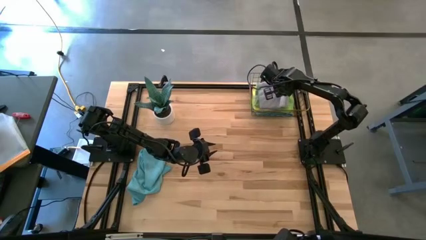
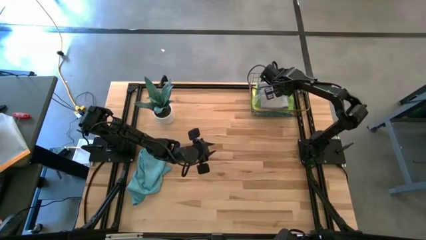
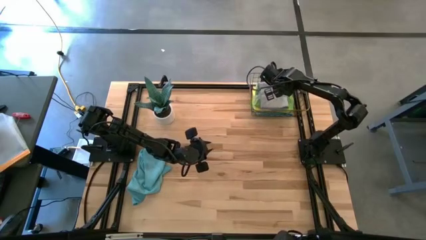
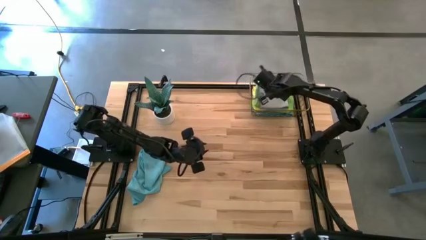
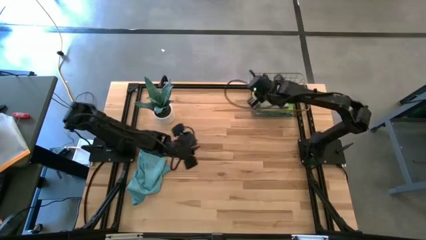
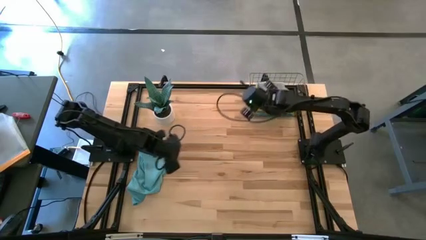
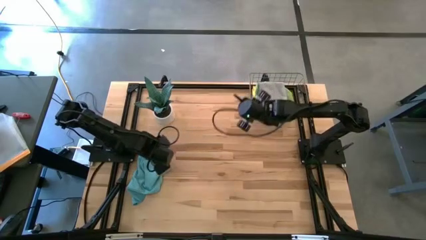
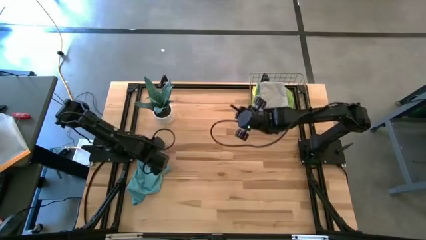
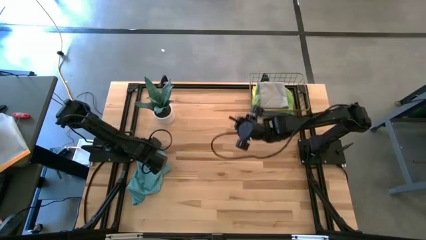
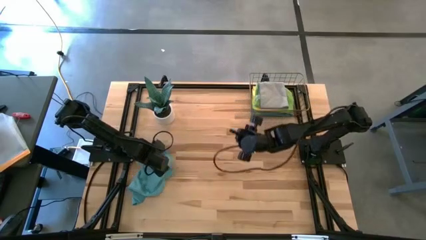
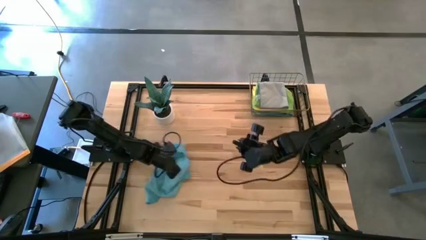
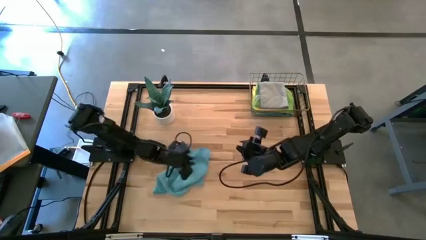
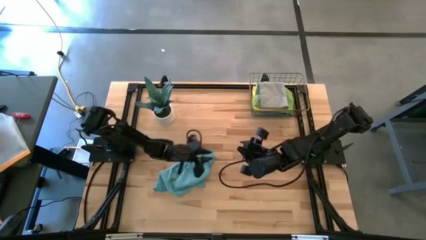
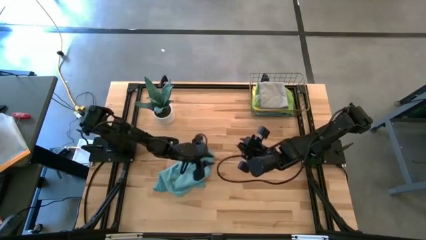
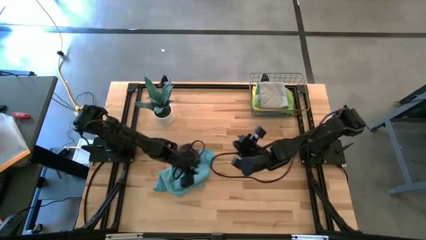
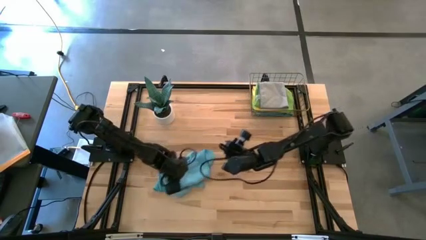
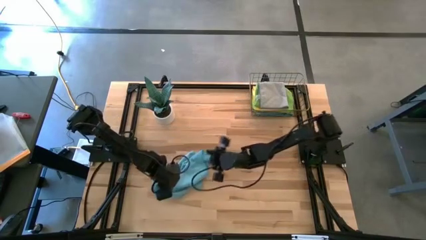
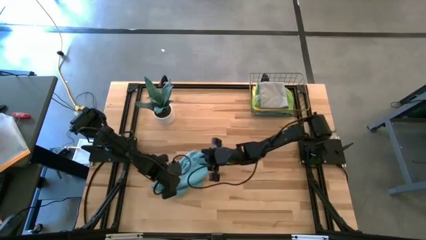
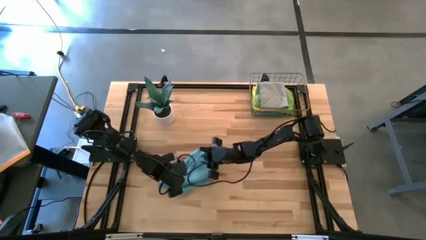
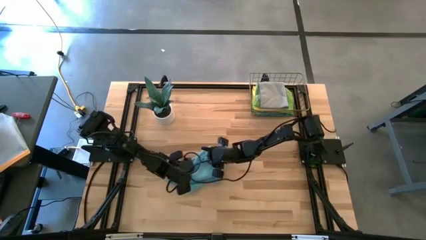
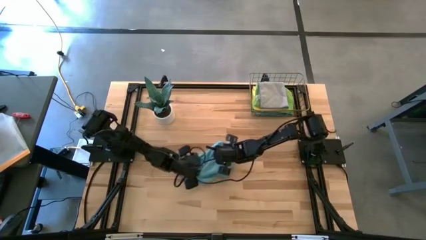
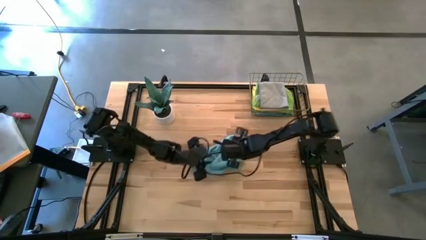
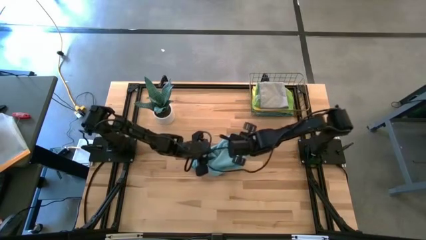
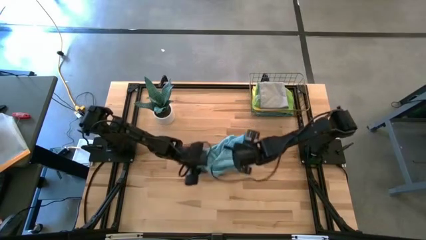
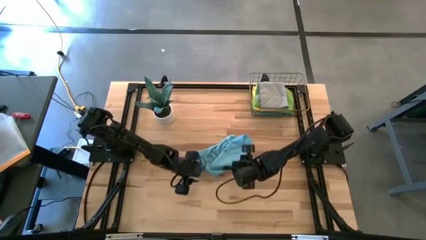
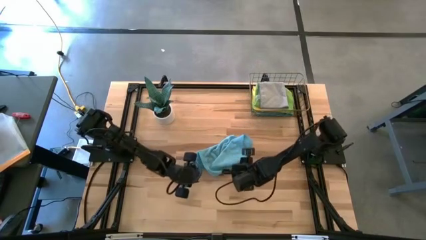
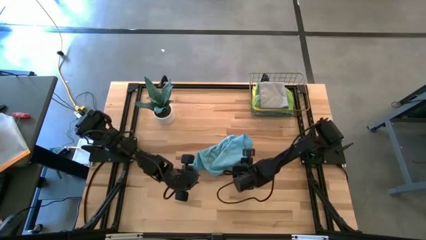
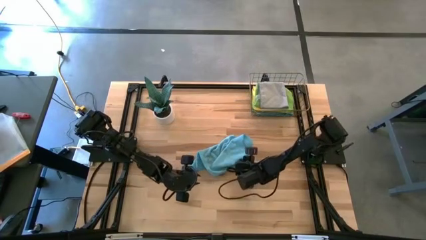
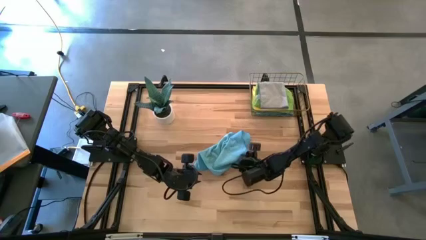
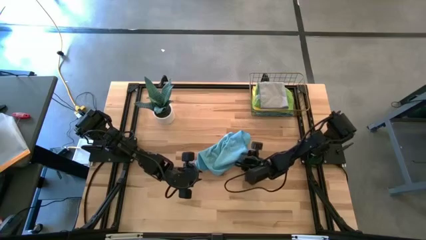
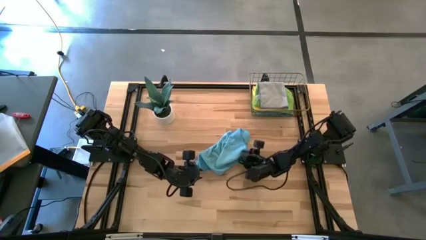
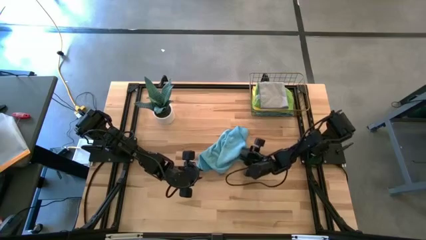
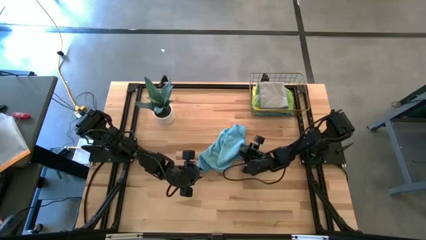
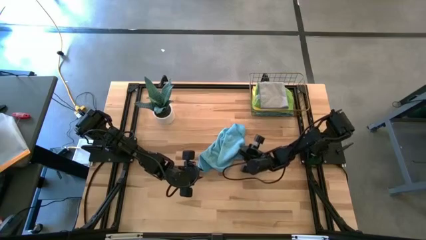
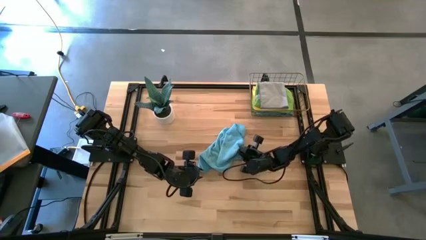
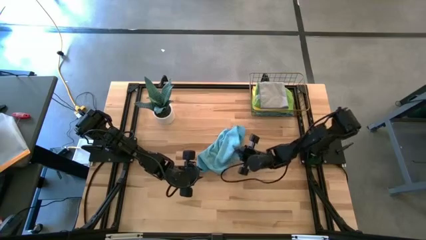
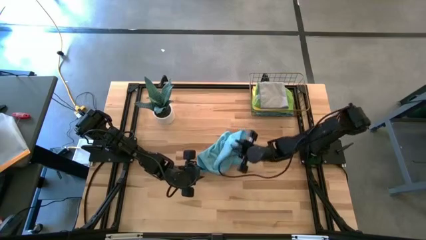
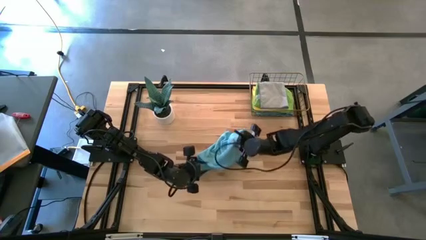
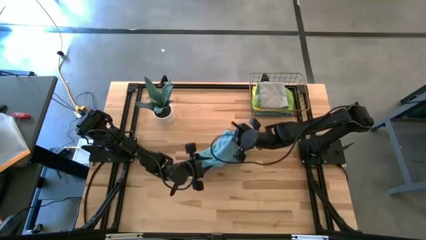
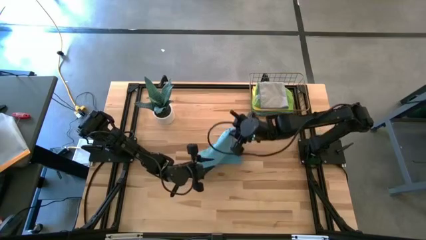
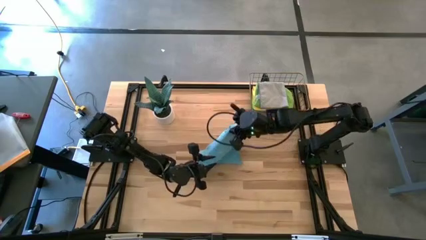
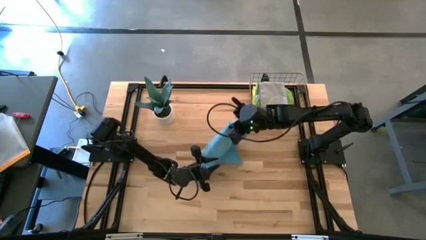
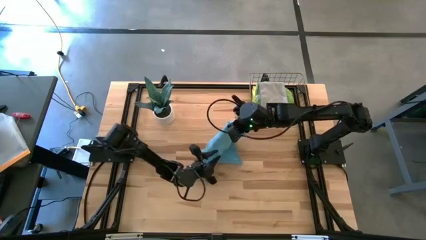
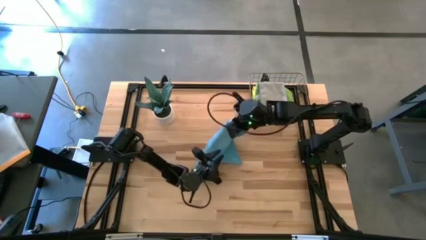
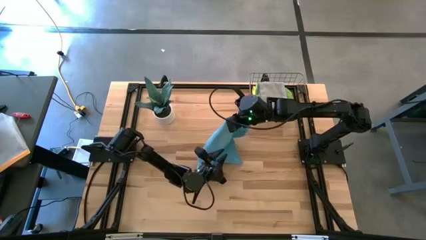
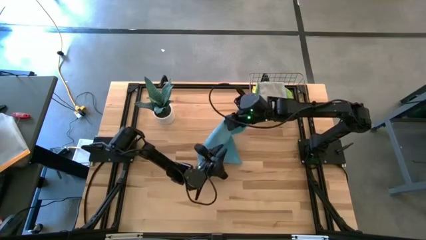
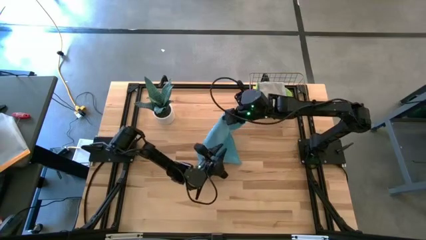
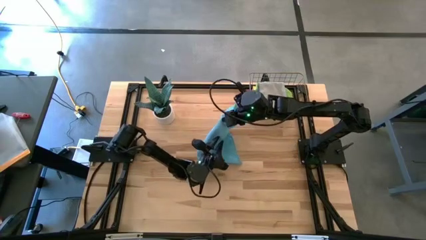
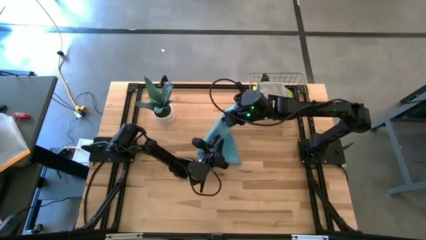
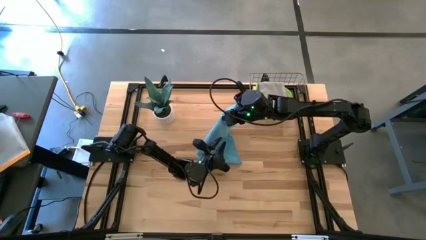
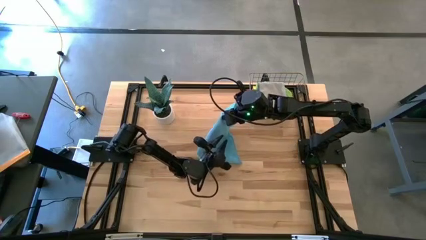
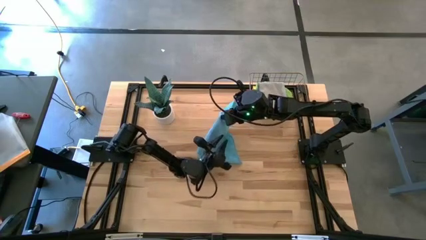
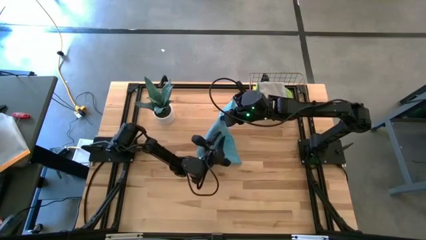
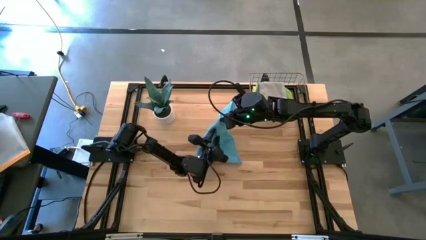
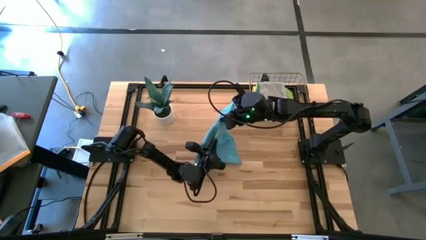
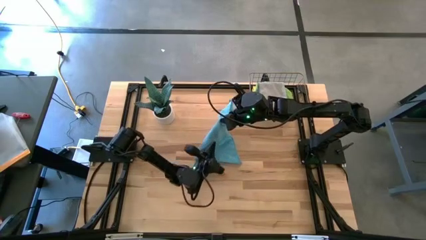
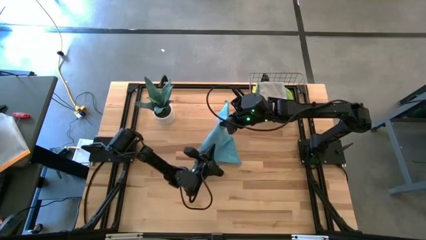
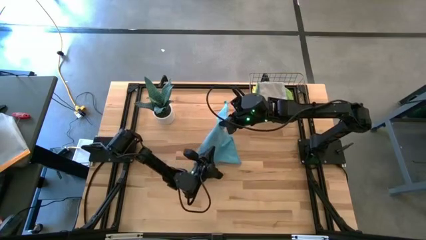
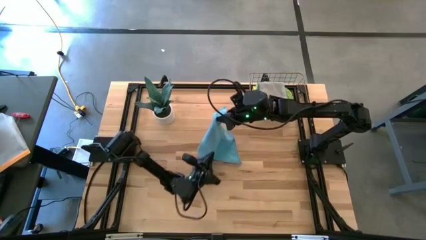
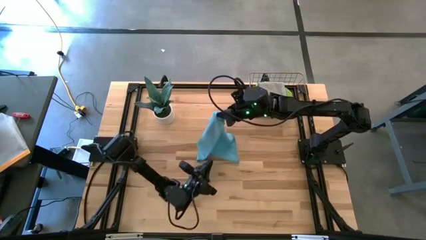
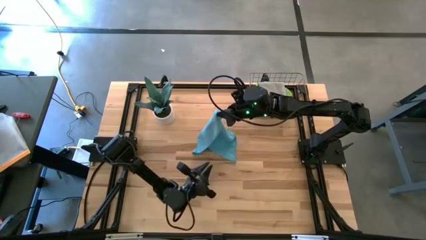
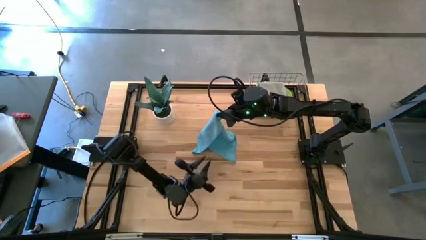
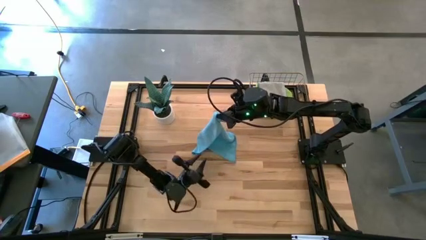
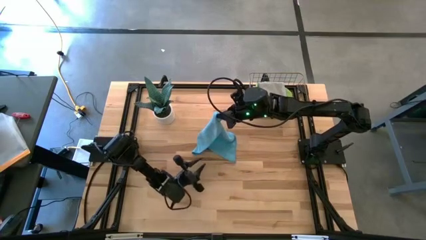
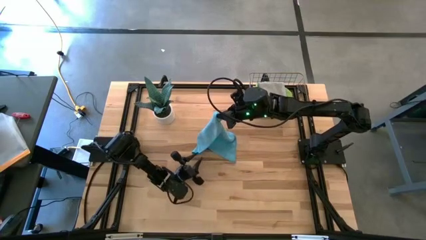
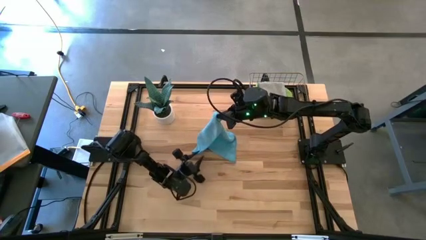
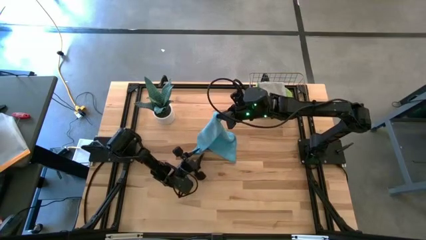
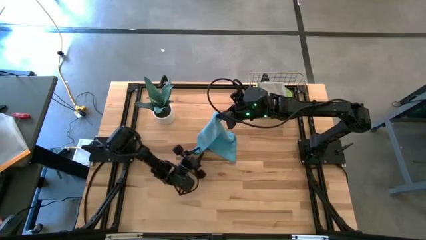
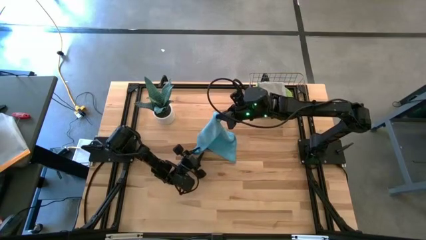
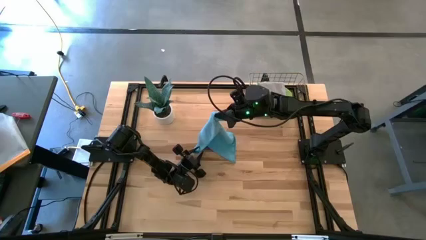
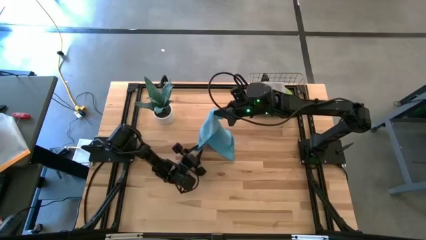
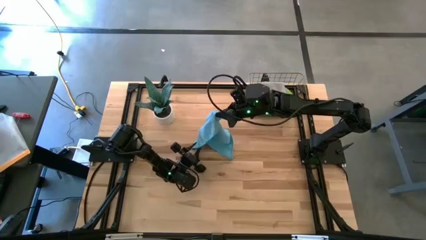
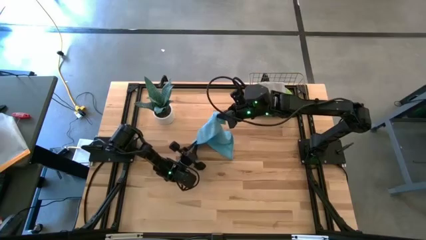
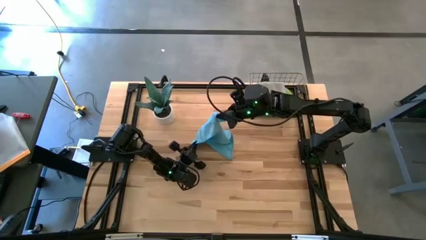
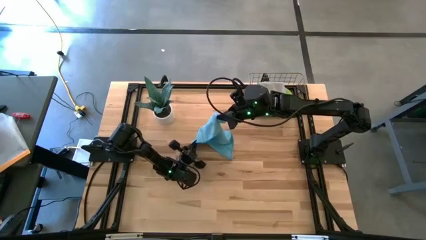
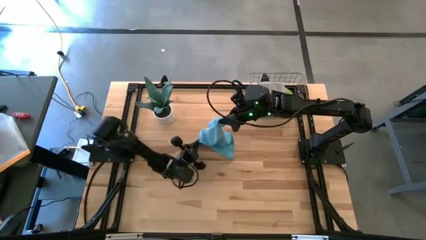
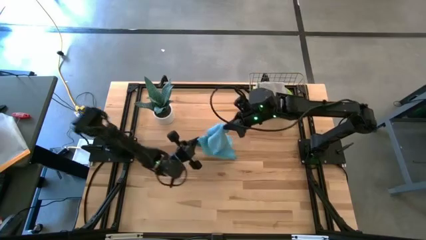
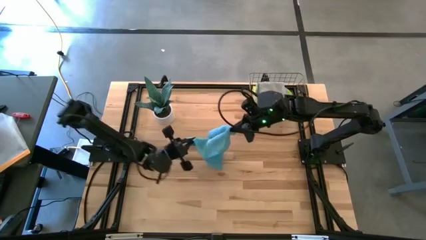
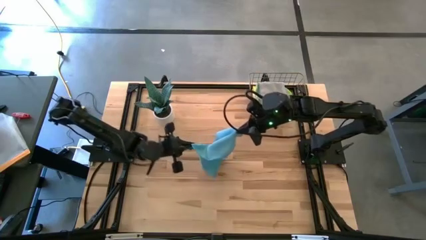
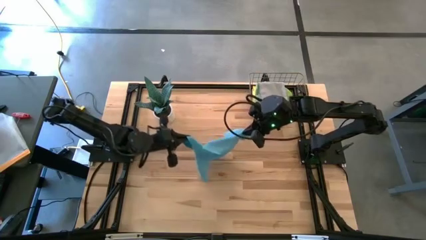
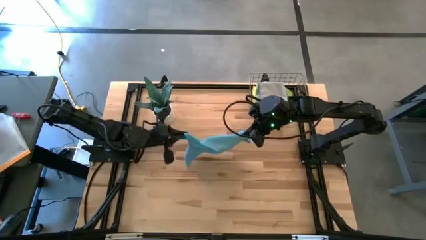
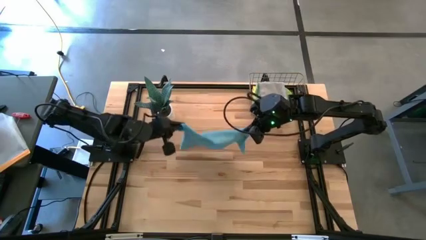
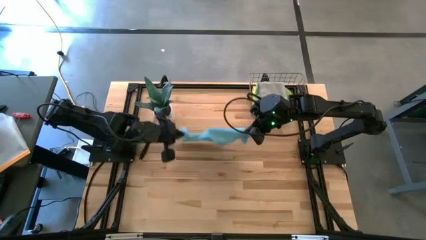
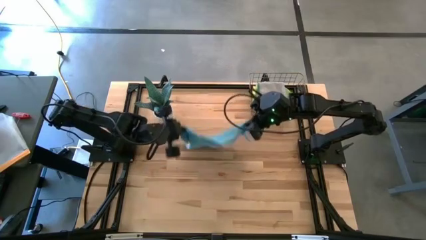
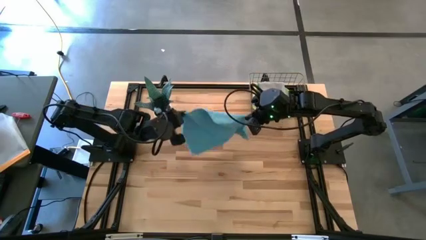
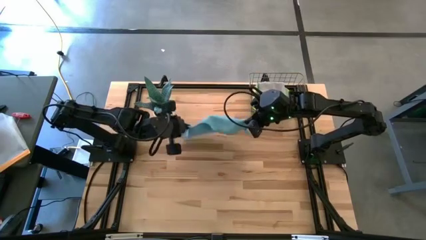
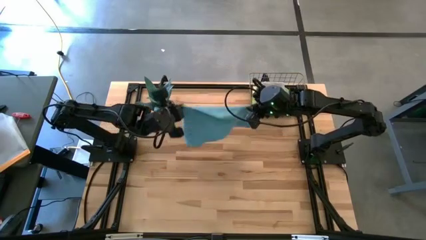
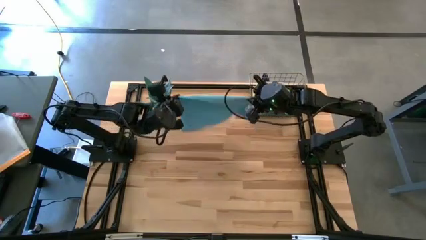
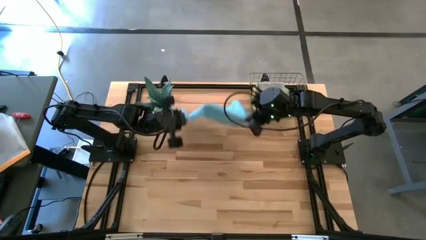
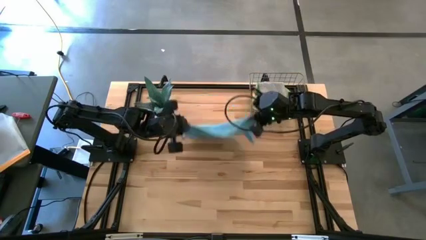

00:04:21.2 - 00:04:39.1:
Task: Fold microfiber towels
Fold the blue towel
